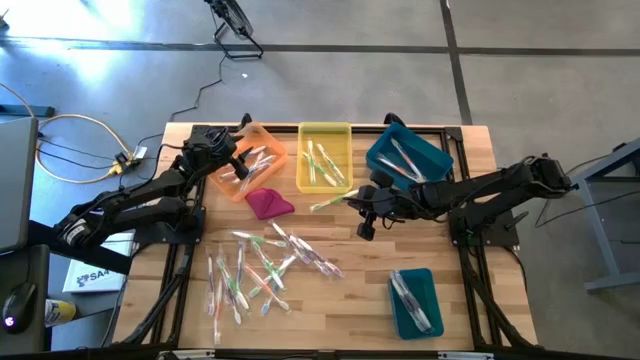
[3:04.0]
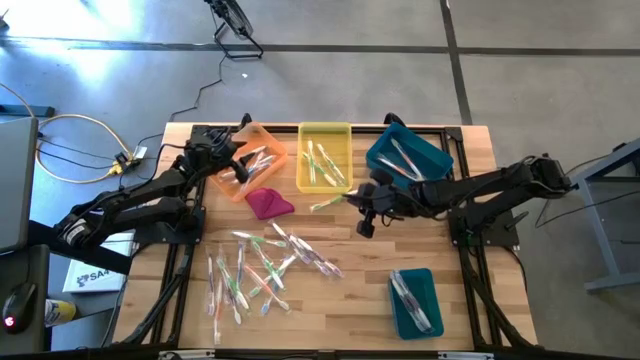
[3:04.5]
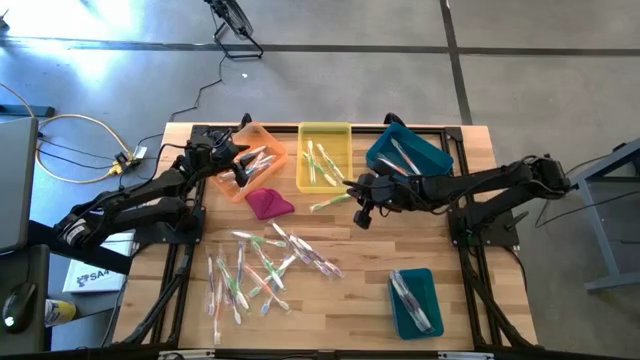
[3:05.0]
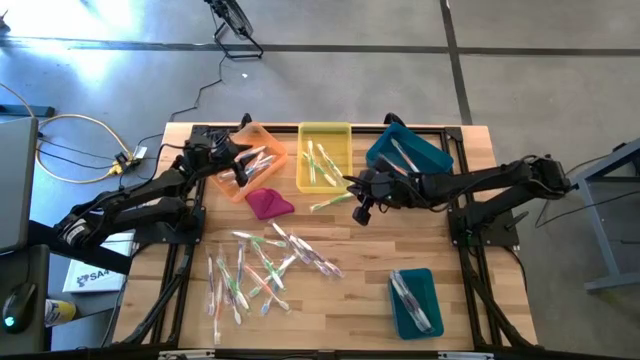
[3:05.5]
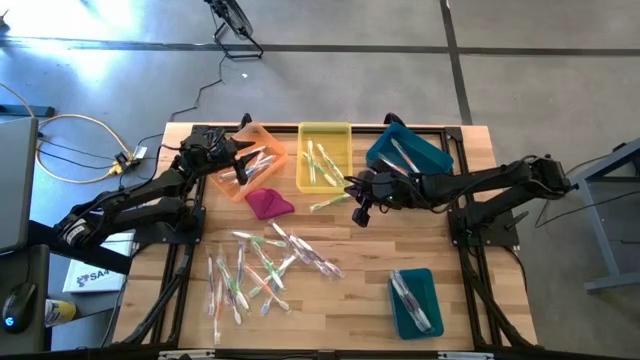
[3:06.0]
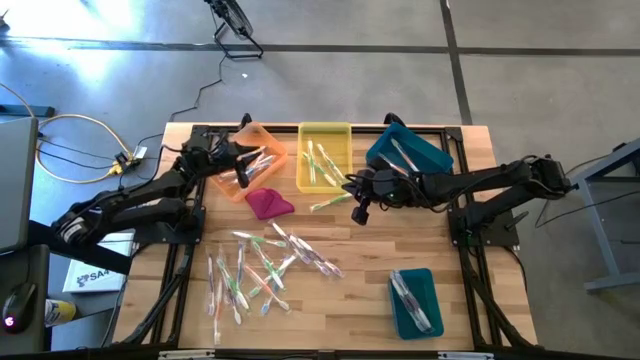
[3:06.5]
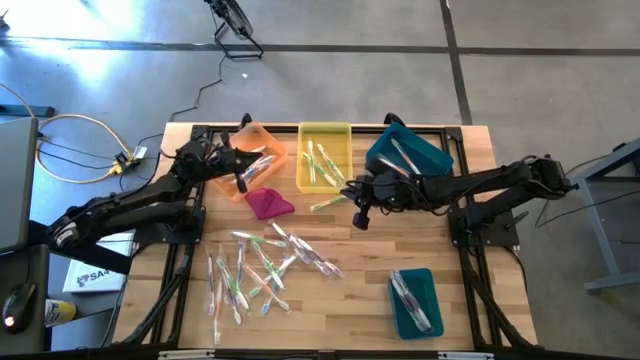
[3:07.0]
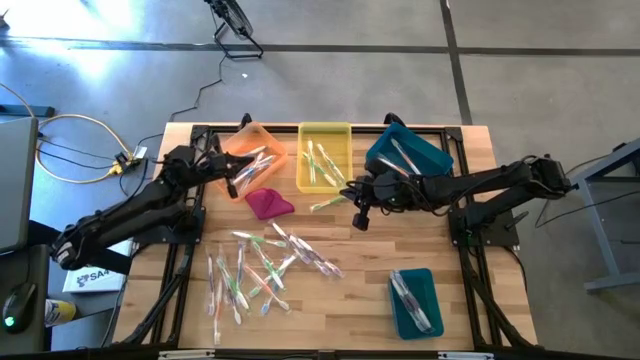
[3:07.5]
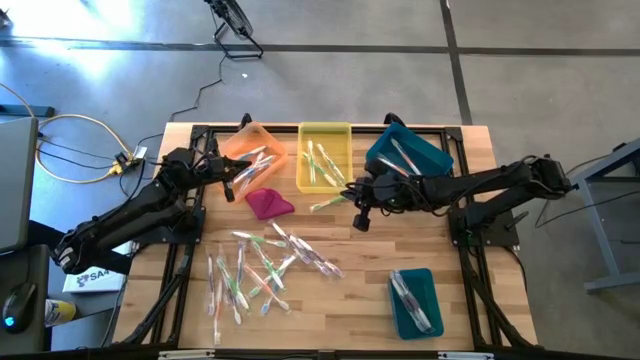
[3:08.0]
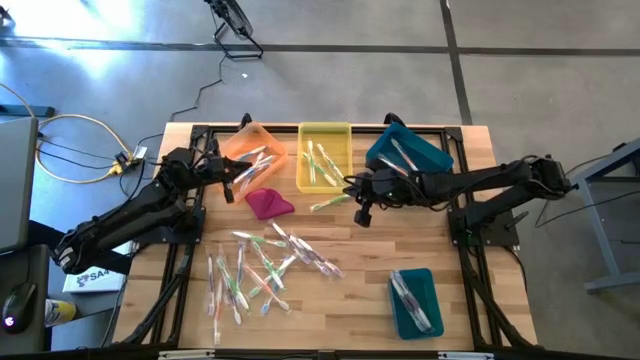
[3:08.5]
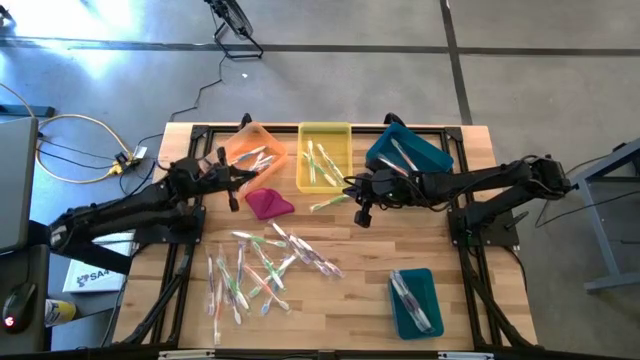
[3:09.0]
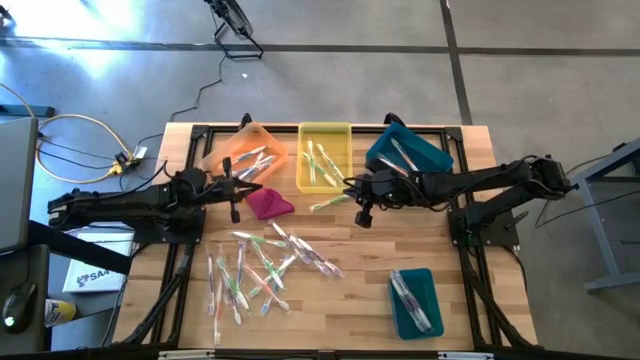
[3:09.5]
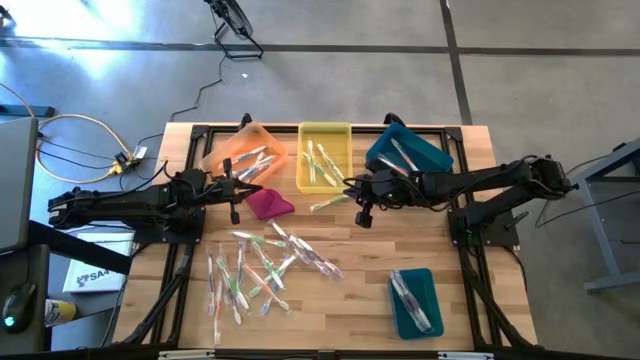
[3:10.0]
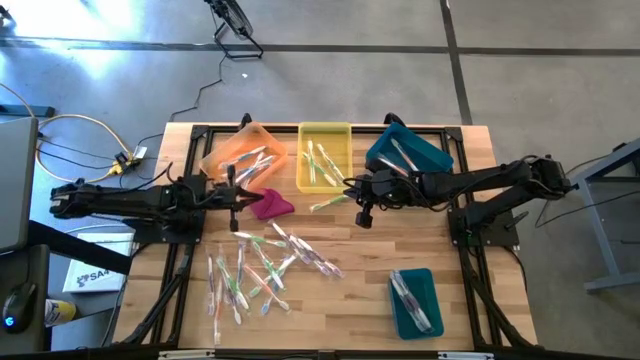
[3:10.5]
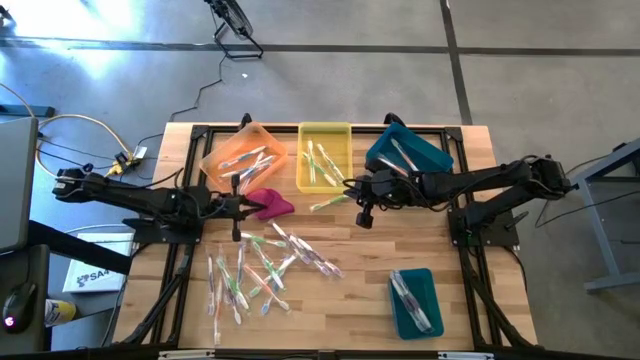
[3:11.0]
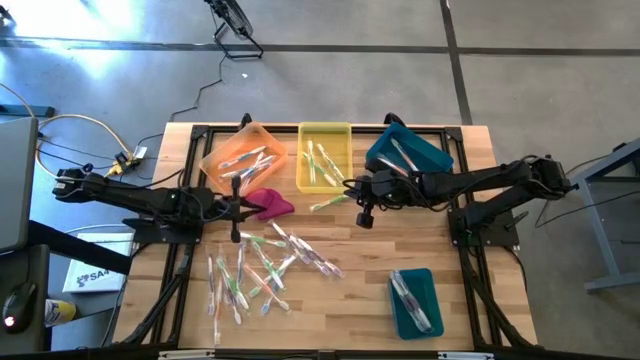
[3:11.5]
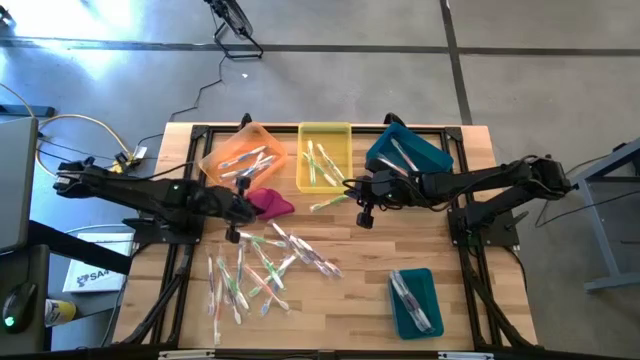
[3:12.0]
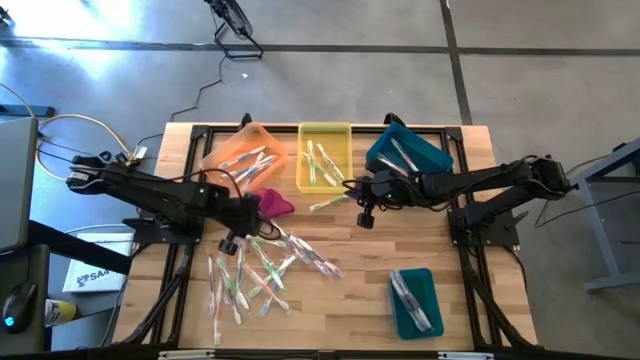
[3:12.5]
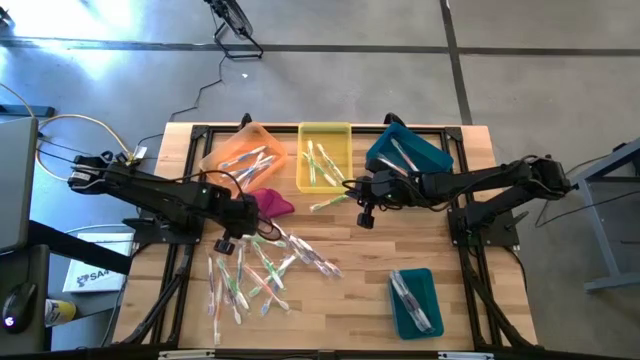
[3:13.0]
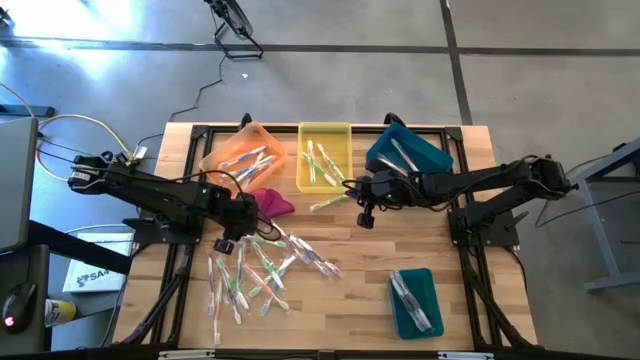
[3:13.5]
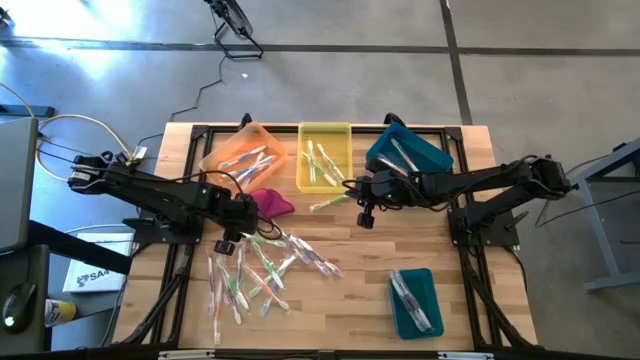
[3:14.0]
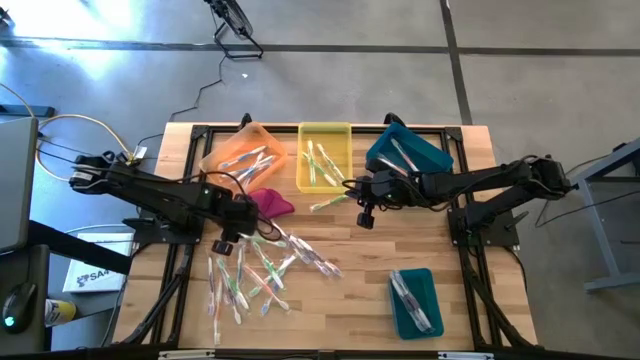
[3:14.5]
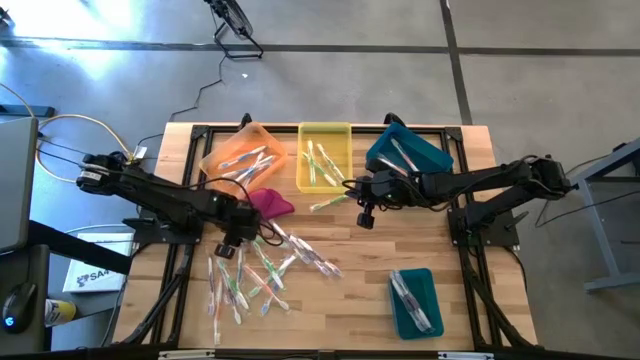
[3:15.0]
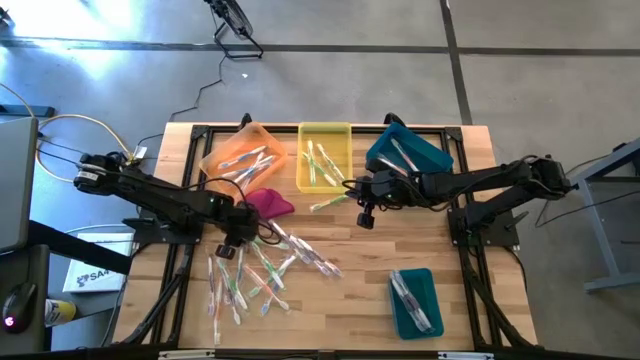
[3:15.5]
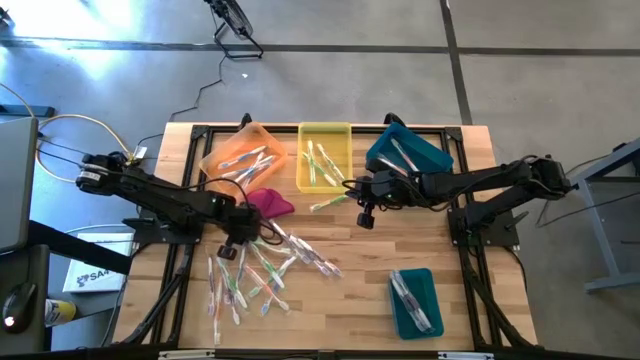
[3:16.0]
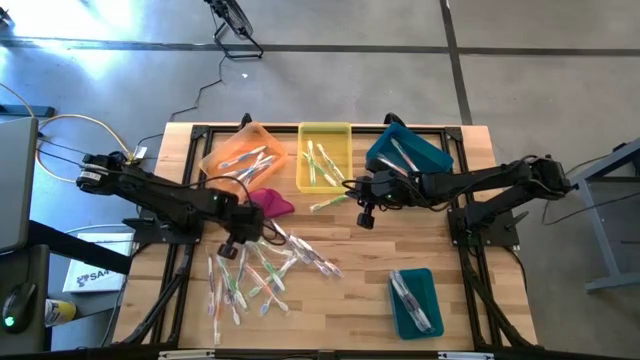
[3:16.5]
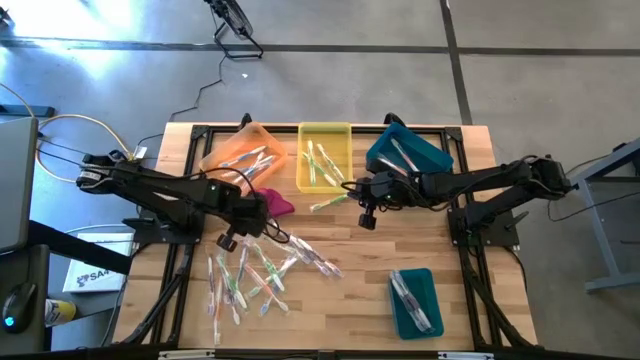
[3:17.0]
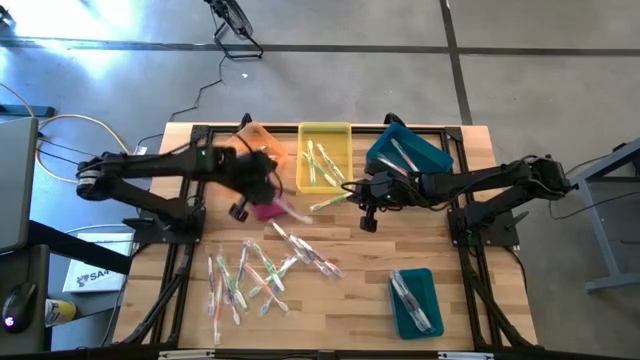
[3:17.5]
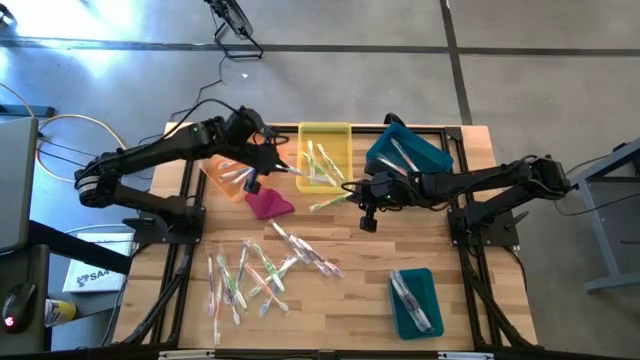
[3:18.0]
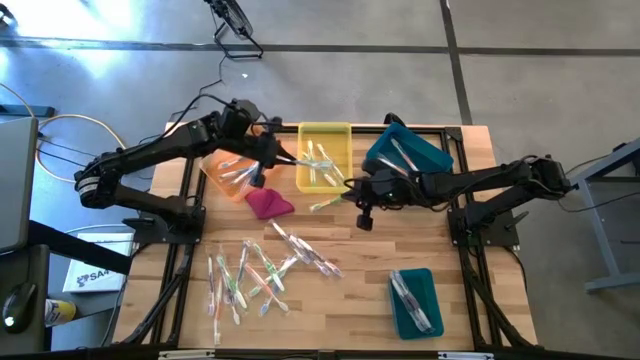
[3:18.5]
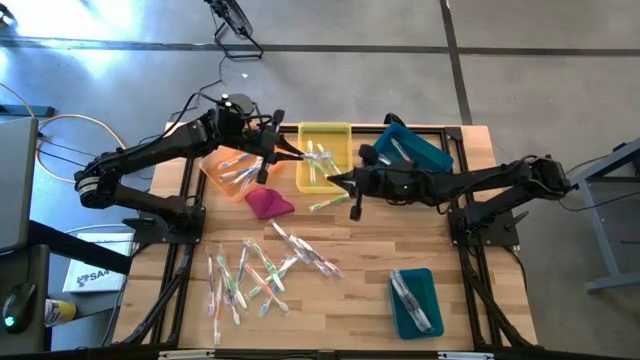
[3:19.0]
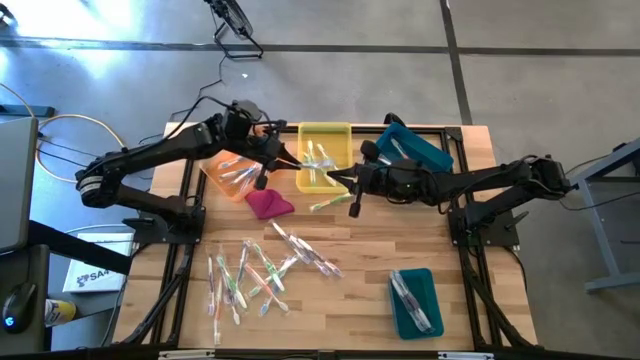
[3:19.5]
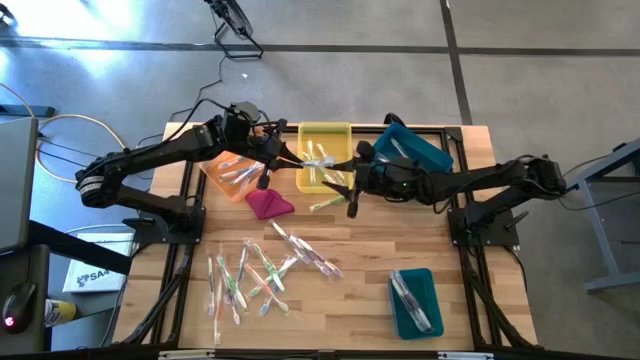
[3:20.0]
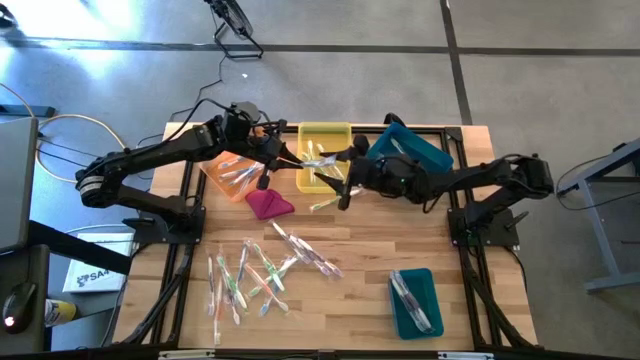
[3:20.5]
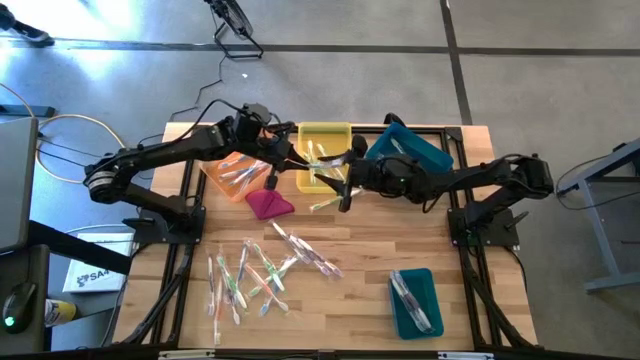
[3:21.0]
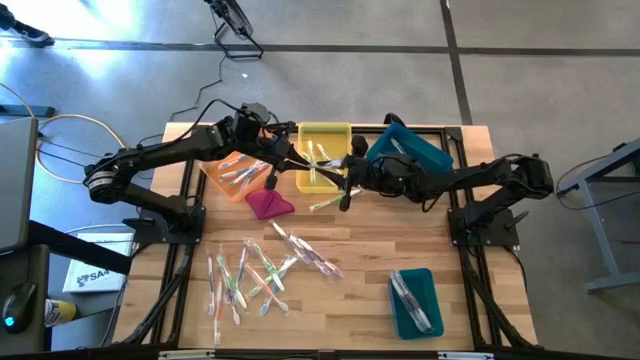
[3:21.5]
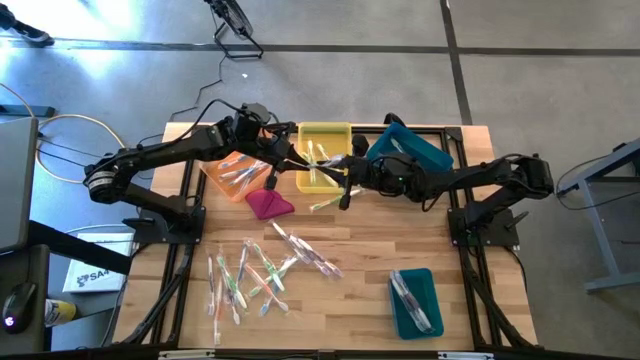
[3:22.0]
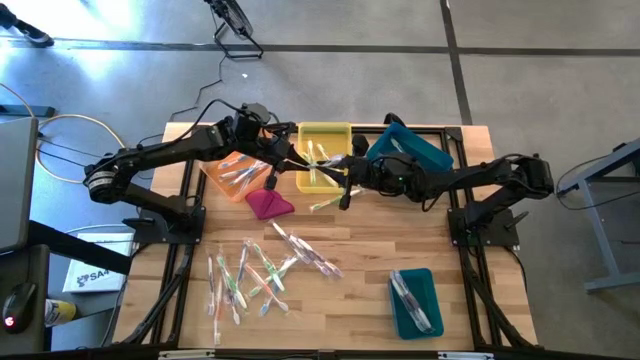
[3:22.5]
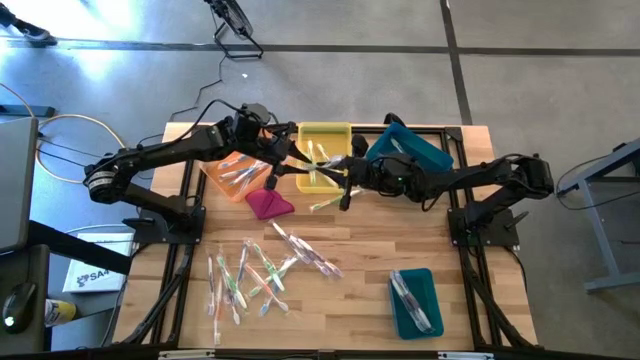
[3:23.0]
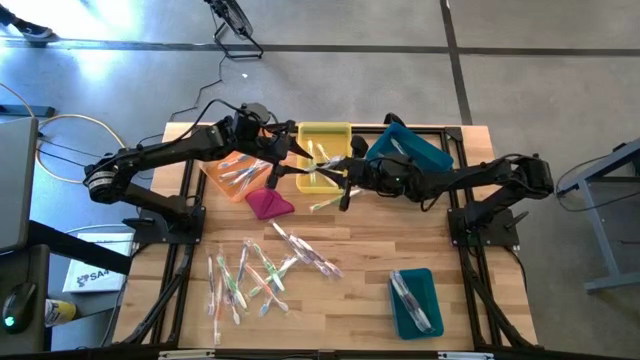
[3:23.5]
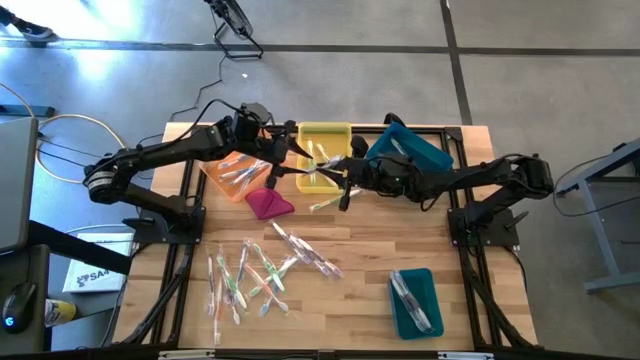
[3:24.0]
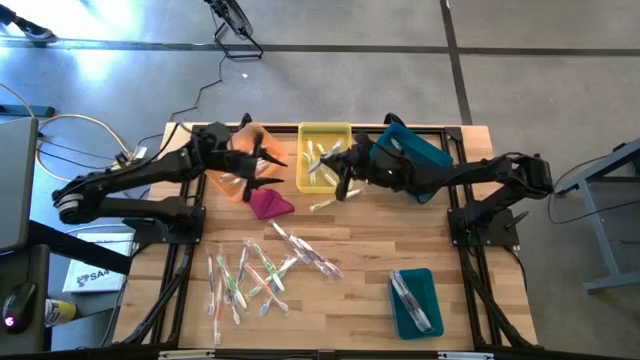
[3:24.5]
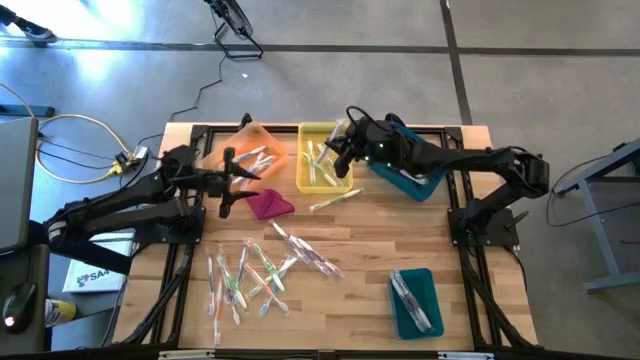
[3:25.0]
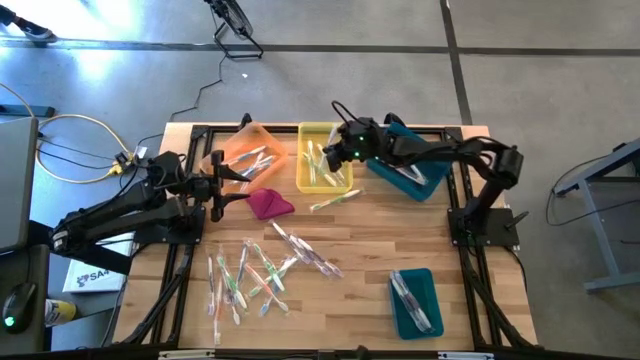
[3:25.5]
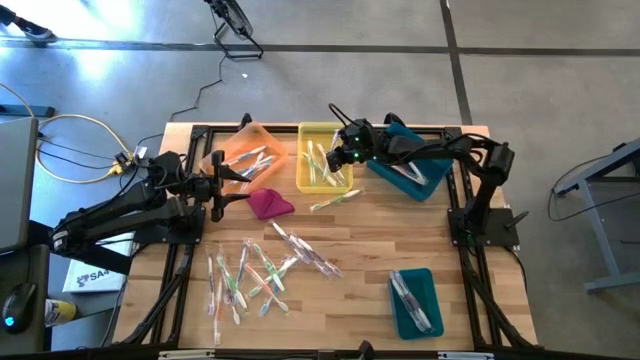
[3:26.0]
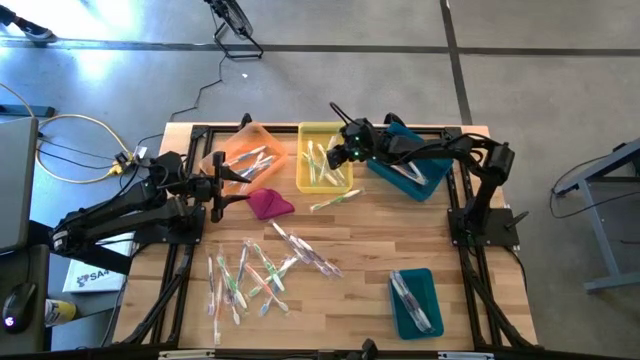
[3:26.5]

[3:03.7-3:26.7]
Task: Pick & Place Toothbrushes
Put the green toothbrush into the yellow bin
